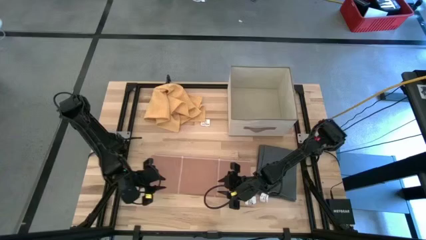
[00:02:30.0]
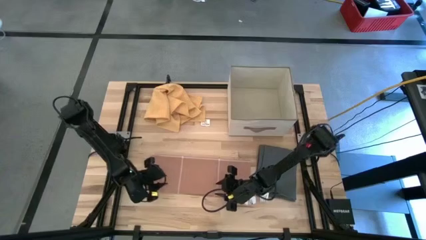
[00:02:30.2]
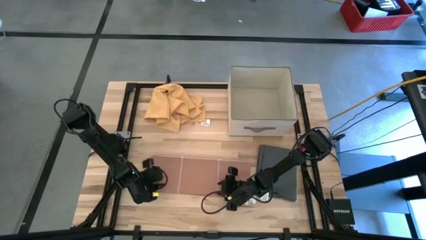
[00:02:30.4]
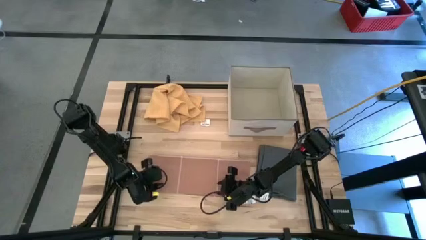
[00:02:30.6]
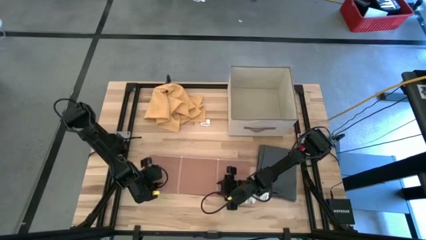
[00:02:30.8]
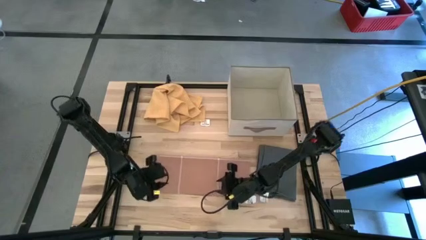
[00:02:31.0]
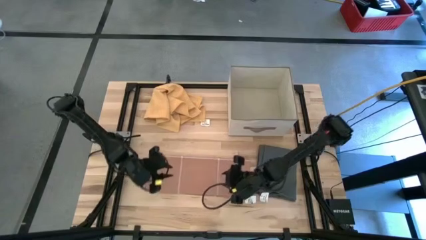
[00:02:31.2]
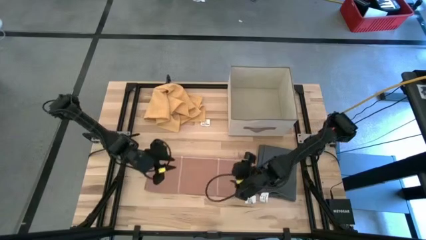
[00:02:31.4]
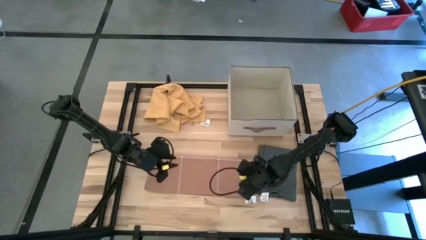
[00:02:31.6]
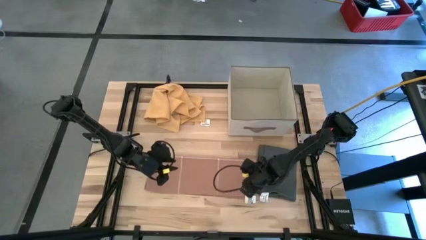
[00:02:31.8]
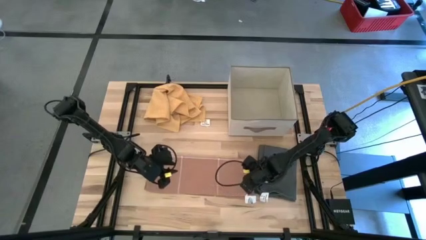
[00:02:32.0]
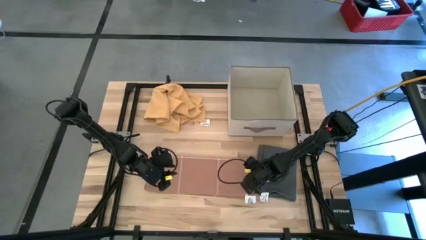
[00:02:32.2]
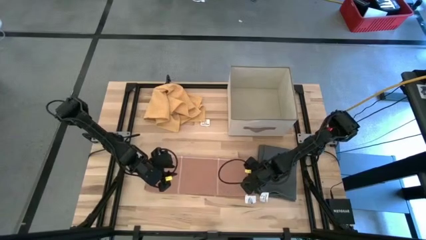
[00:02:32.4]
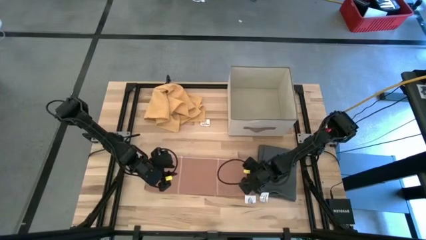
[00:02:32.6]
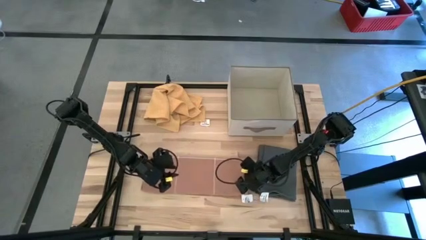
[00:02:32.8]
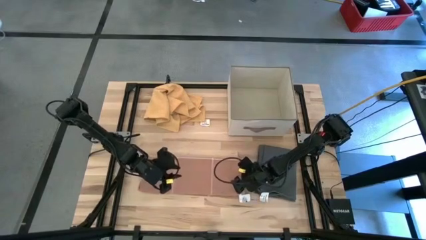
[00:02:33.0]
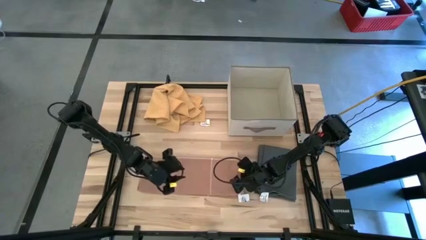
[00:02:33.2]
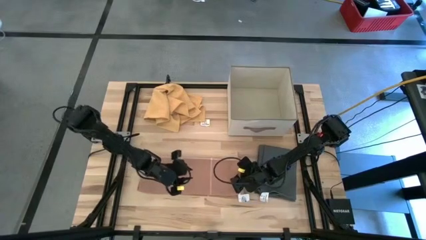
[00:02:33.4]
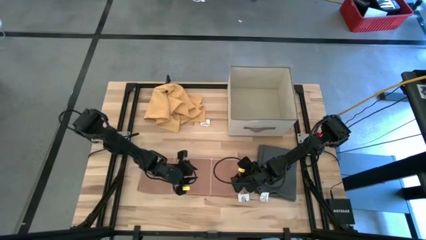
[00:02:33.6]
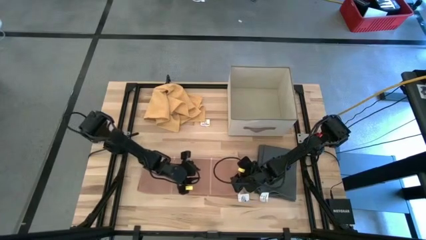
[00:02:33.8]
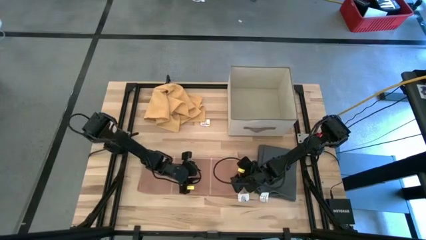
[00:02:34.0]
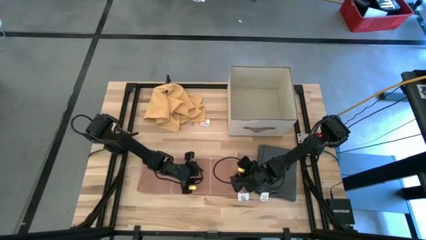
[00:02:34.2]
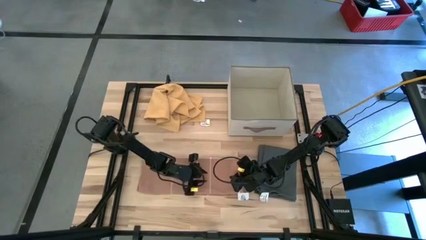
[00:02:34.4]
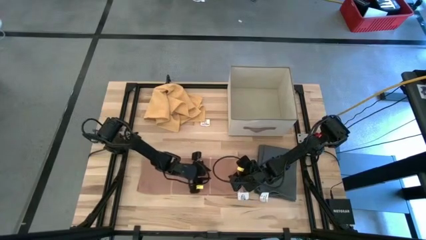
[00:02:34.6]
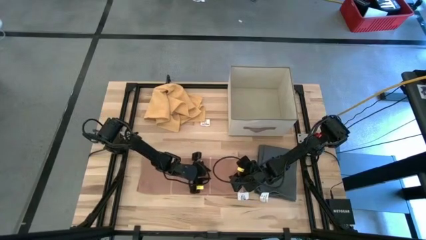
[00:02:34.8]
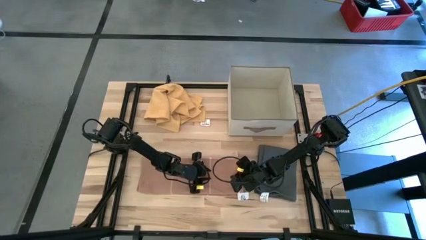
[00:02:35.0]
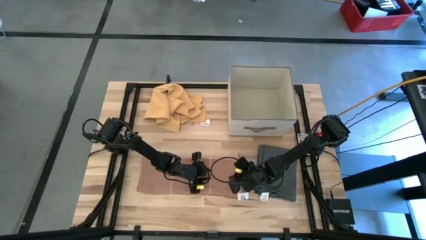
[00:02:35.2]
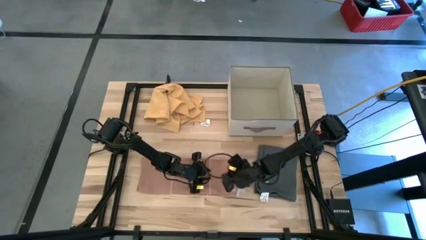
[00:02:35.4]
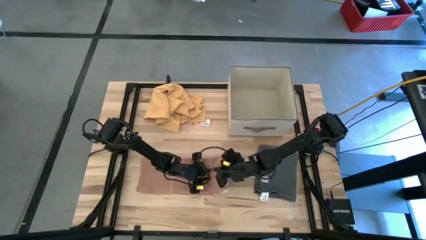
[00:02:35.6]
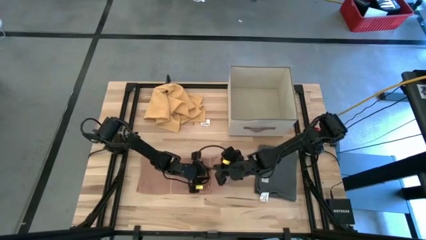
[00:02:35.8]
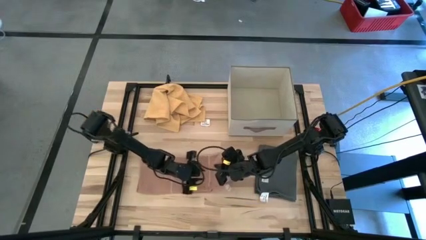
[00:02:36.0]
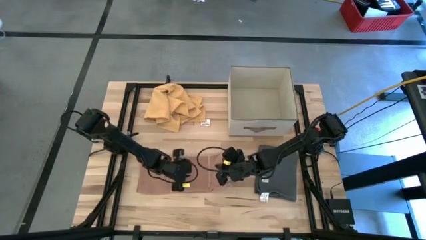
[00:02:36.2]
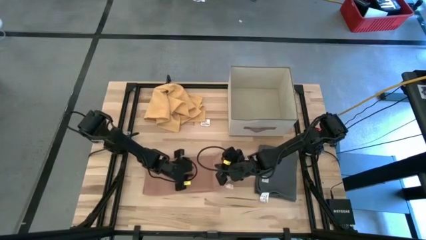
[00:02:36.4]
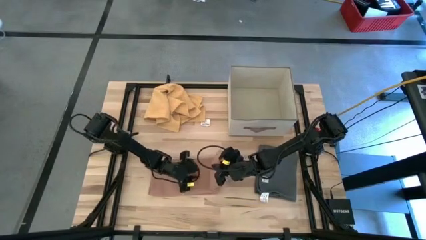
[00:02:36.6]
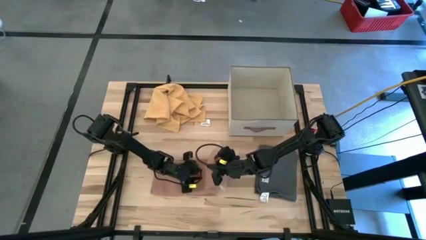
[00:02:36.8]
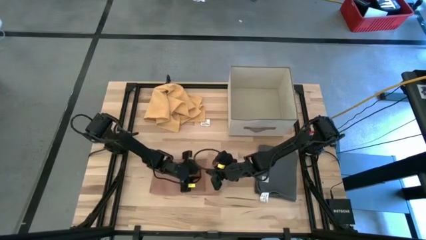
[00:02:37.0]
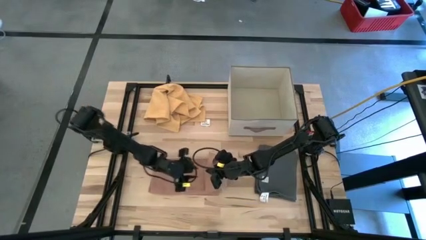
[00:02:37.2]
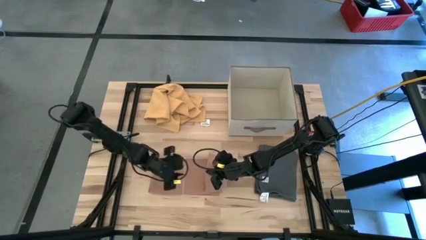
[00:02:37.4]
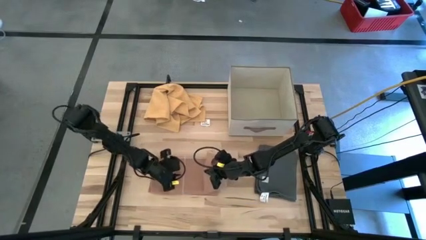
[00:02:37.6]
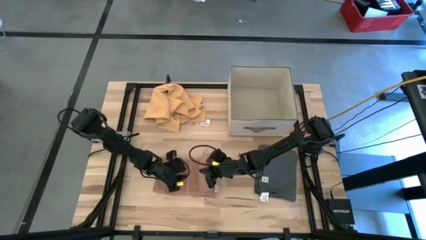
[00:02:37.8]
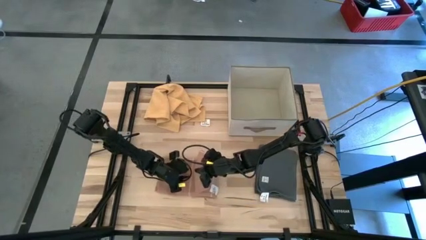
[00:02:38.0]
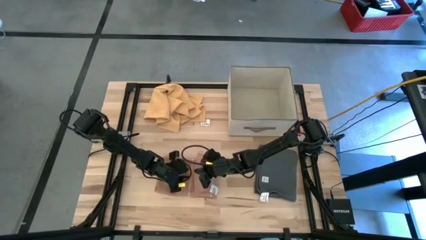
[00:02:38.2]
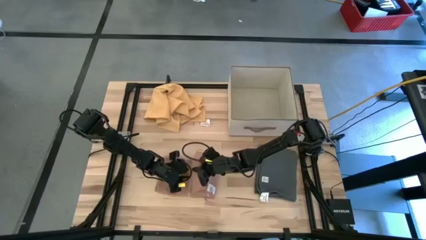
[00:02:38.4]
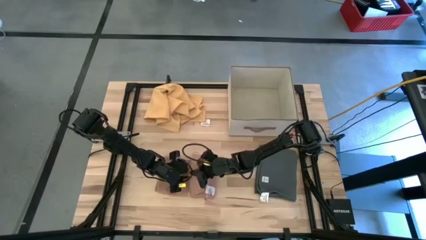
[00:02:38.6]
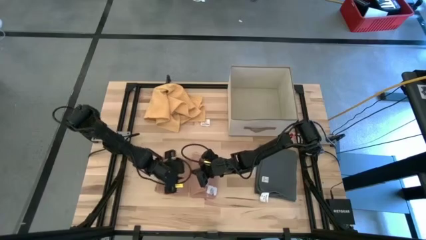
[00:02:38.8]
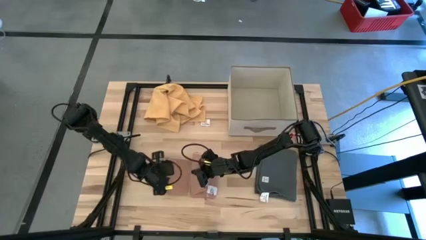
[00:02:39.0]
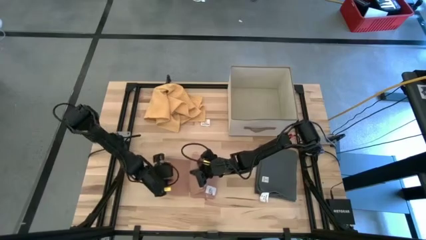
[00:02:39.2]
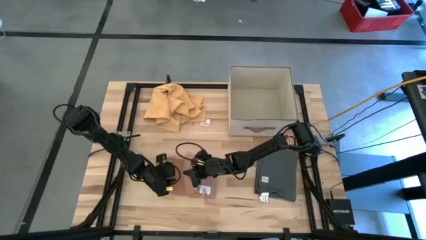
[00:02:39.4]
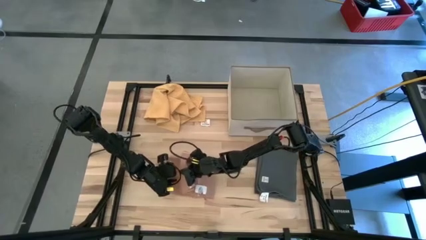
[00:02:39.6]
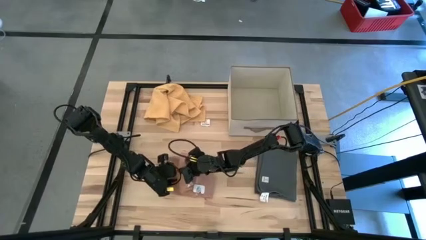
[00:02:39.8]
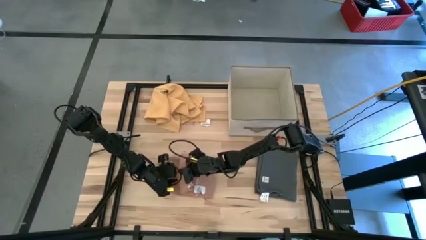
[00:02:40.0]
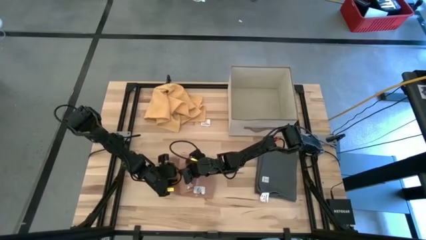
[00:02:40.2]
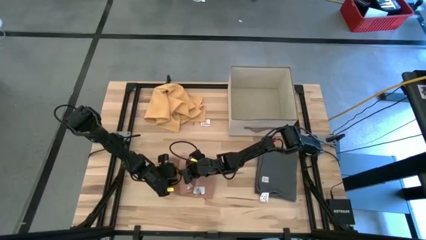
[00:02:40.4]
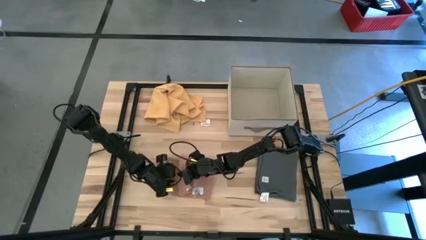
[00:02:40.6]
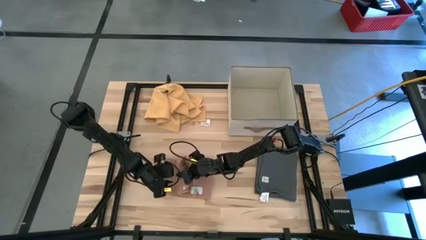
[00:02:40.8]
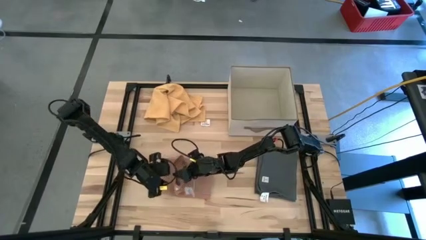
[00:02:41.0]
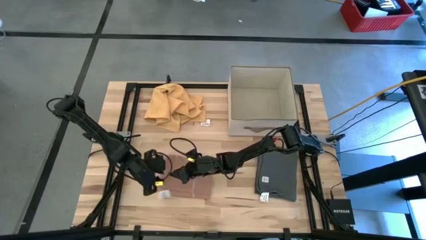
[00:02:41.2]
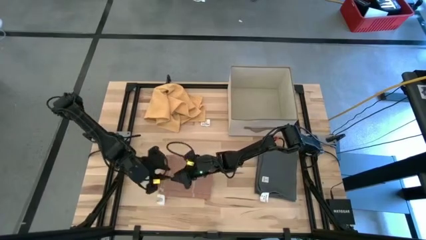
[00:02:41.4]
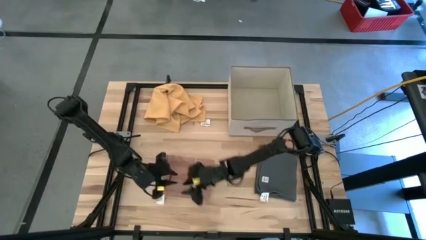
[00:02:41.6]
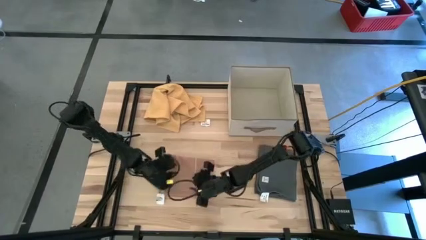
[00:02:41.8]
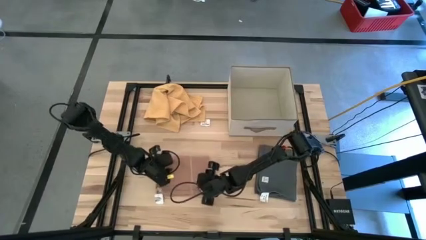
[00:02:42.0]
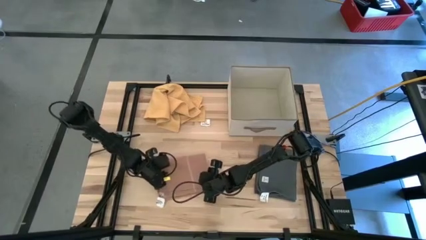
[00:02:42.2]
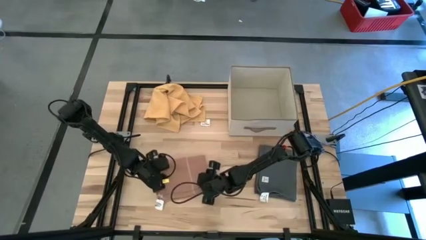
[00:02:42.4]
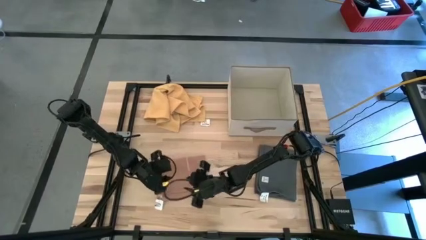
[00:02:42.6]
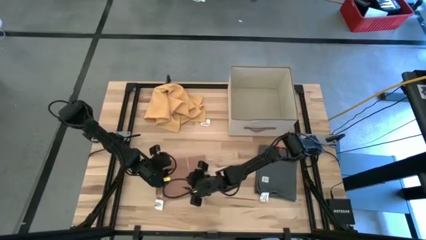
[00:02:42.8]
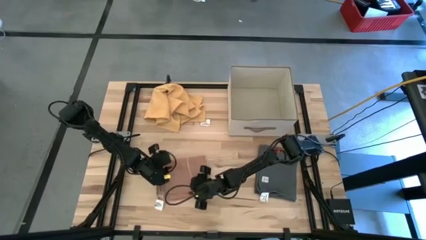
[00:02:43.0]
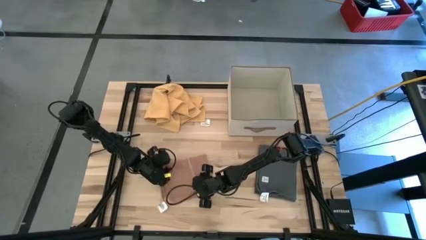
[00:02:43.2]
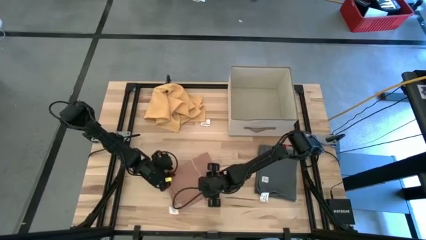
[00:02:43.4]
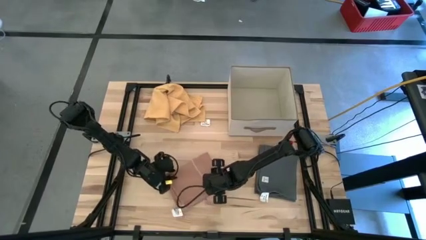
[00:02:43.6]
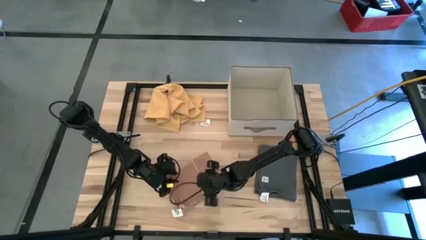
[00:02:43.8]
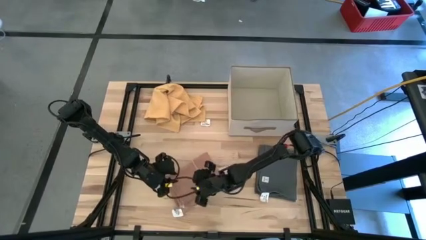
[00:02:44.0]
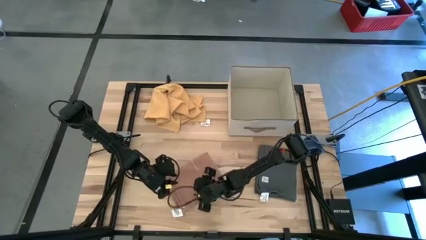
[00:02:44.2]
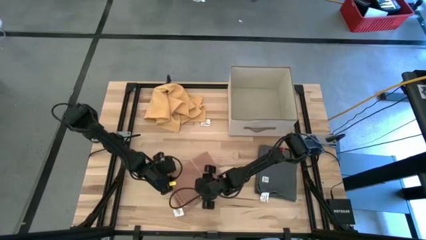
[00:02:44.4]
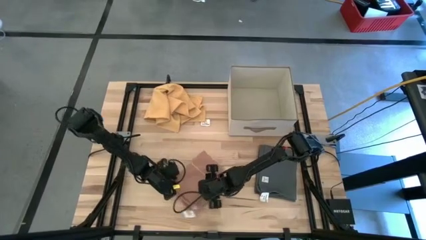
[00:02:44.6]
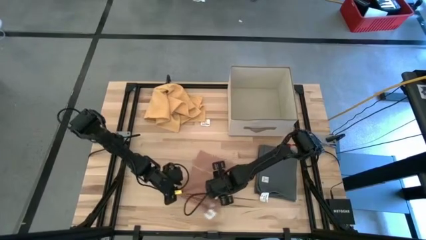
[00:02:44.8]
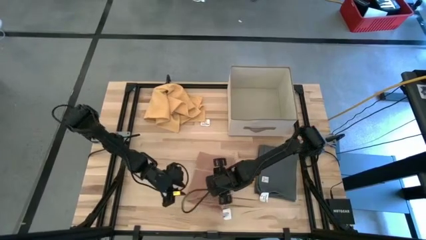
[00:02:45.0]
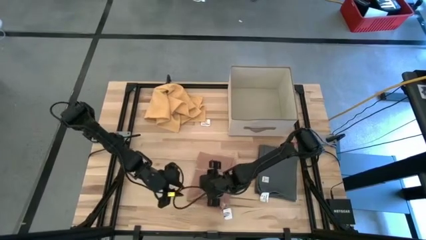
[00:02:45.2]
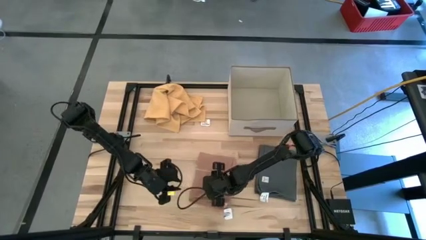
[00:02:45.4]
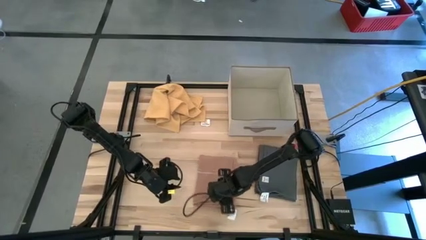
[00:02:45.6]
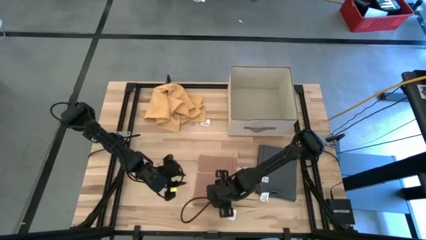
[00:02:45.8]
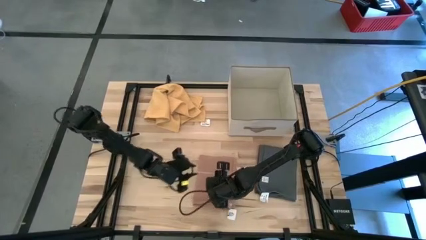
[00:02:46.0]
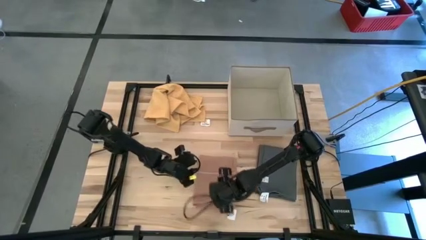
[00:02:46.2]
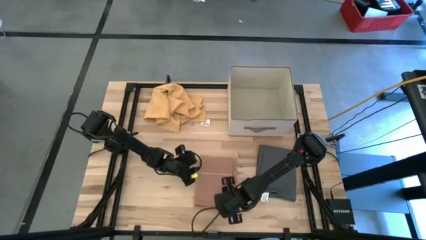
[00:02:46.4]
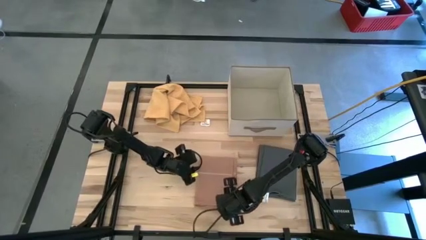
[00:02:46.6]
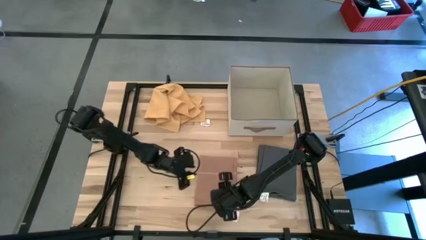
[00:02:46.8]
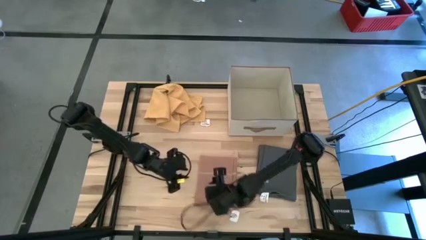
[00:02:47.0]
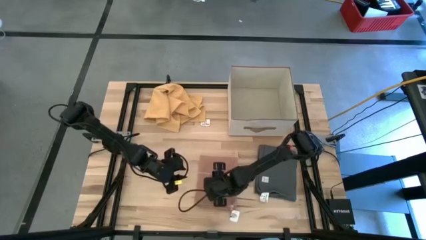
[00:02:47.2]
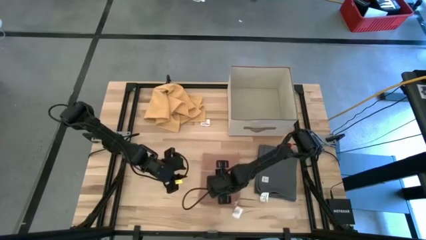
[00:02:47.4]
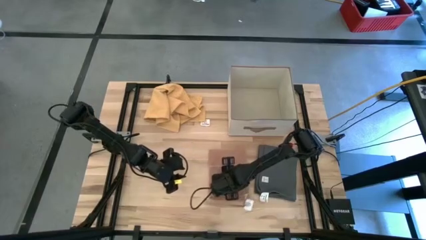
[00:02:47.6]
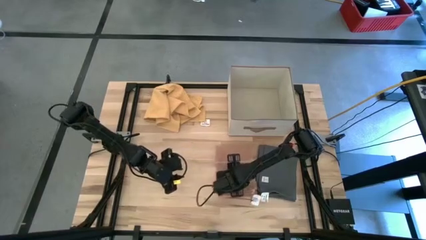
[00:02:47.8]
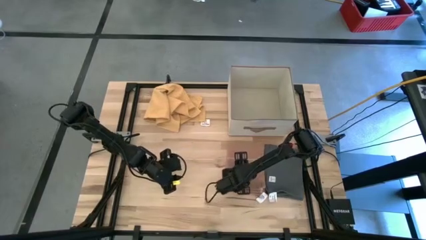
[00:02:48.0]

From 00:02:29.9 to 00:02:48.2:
Task: Fold towel
Fold the light orange towel
